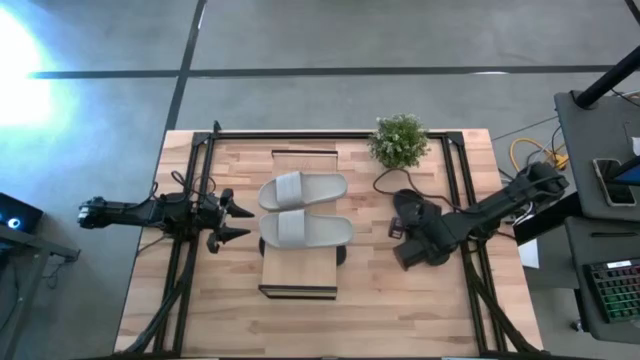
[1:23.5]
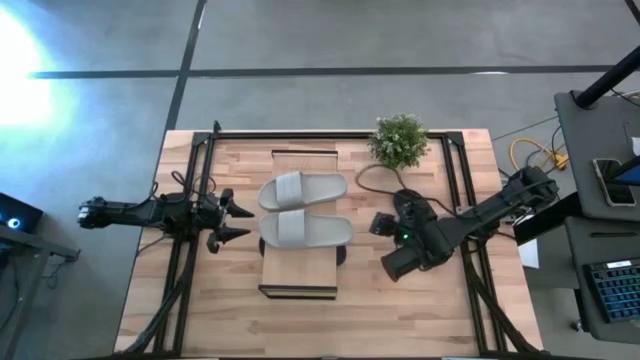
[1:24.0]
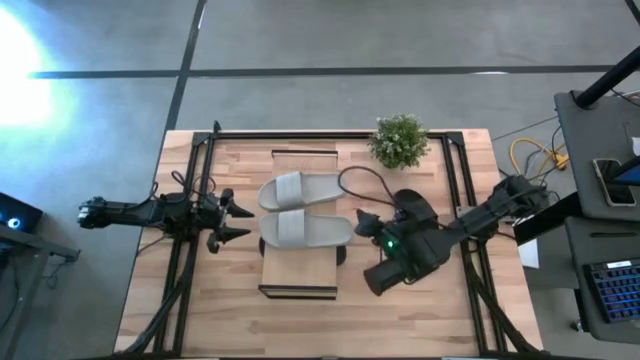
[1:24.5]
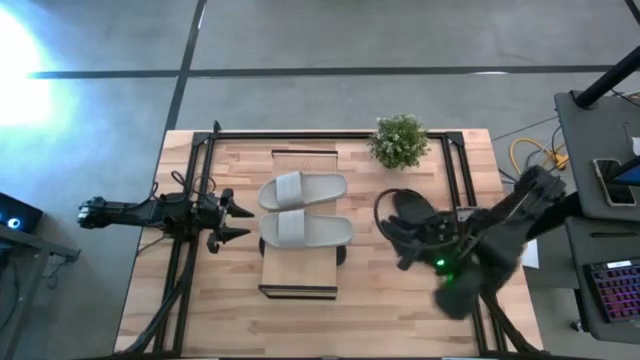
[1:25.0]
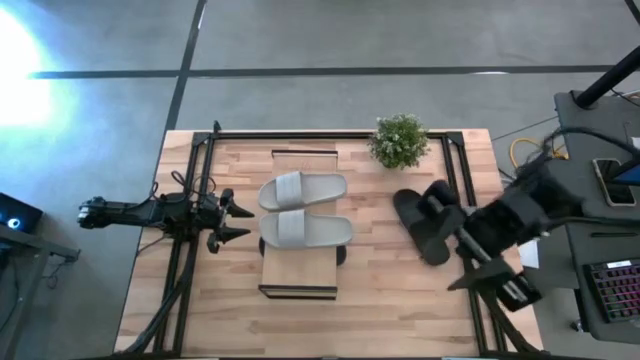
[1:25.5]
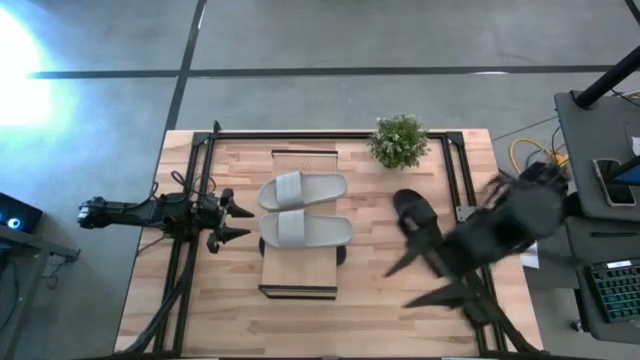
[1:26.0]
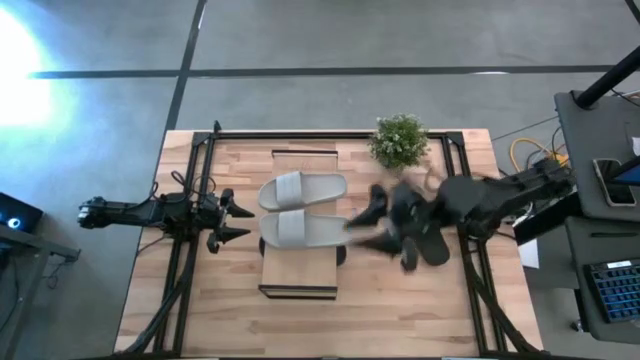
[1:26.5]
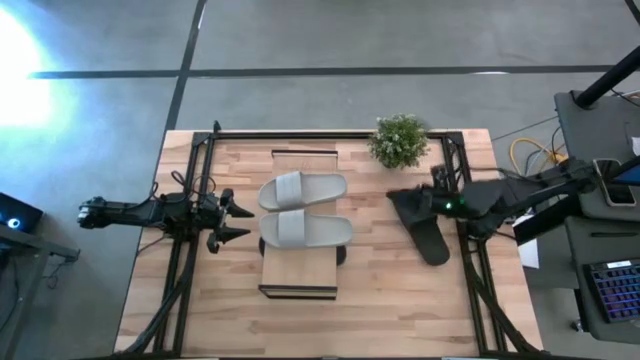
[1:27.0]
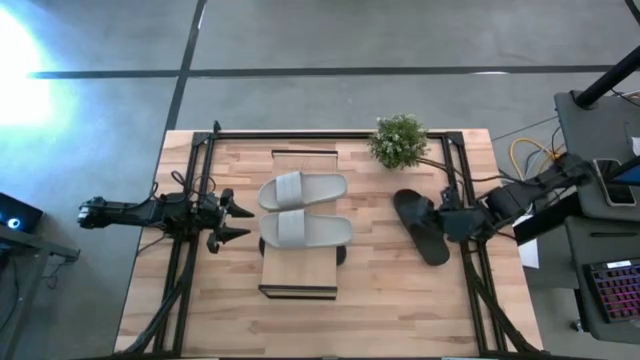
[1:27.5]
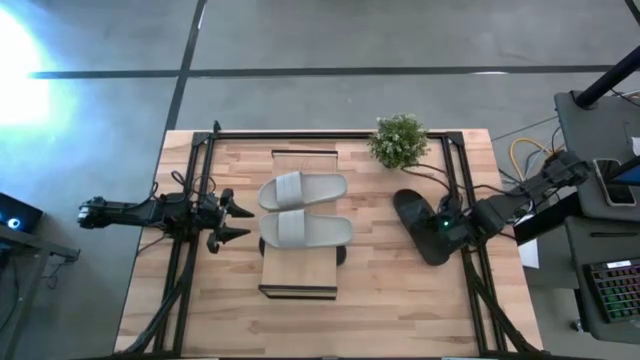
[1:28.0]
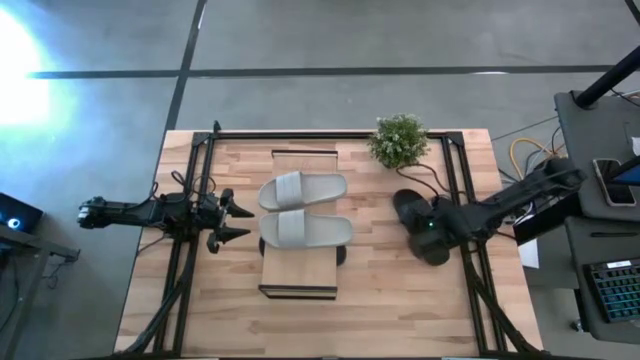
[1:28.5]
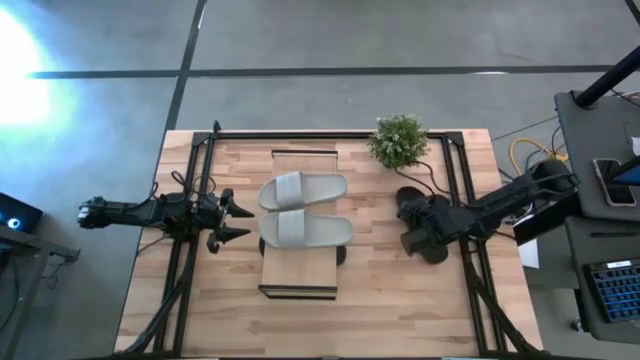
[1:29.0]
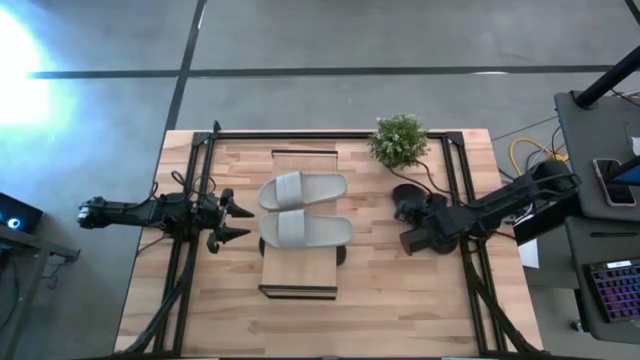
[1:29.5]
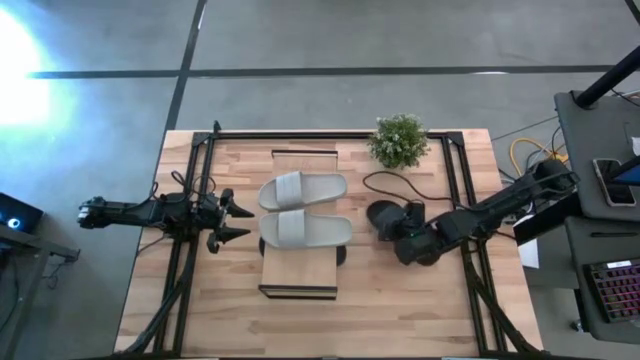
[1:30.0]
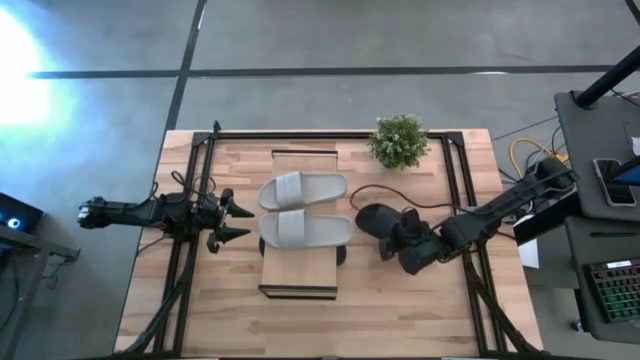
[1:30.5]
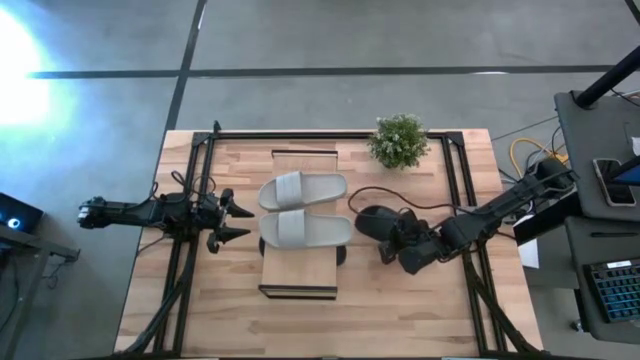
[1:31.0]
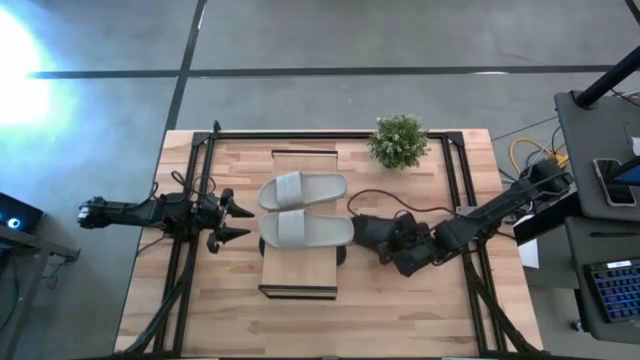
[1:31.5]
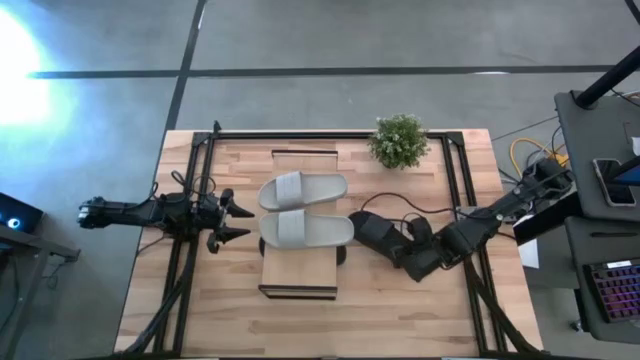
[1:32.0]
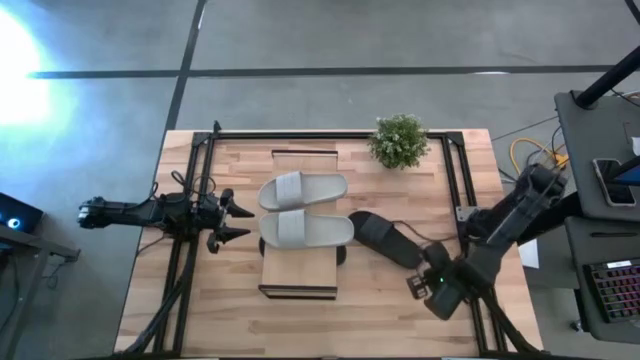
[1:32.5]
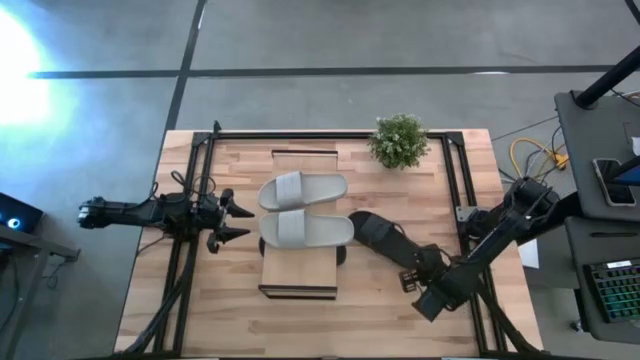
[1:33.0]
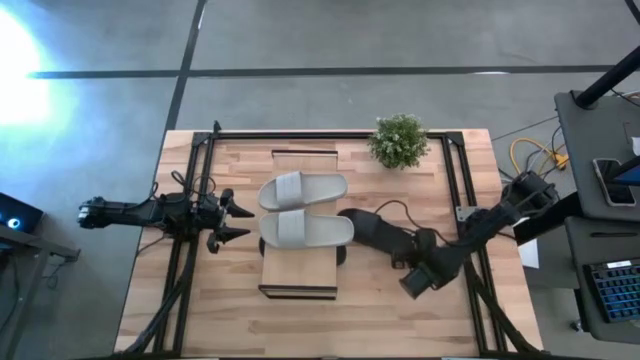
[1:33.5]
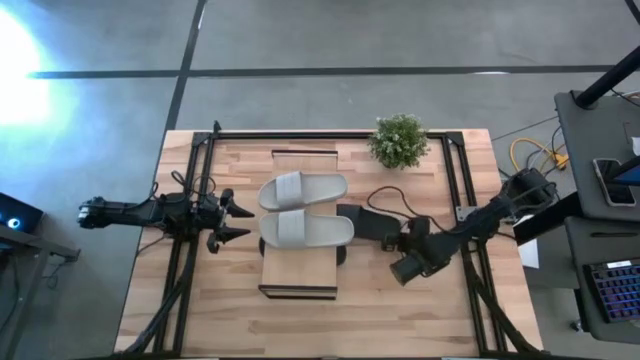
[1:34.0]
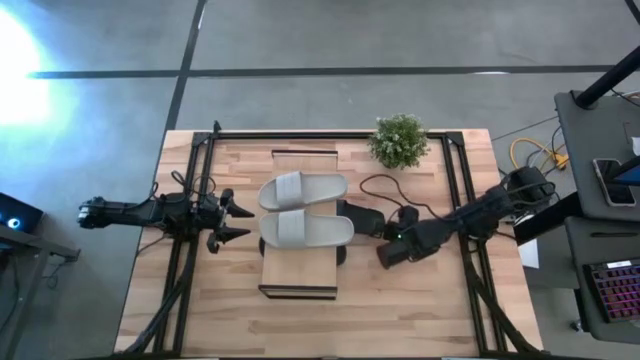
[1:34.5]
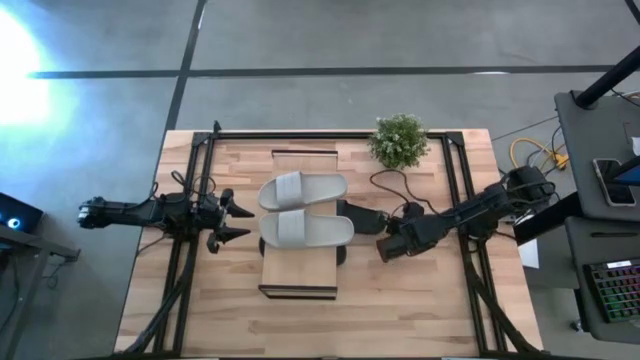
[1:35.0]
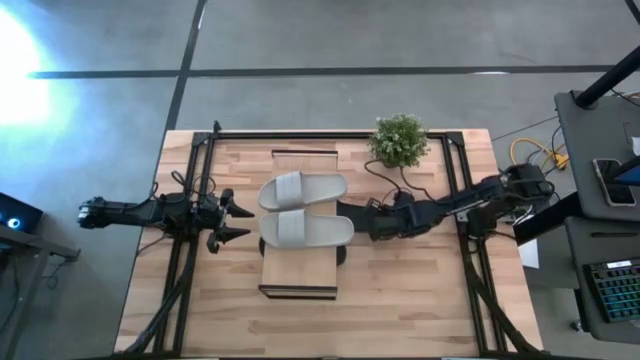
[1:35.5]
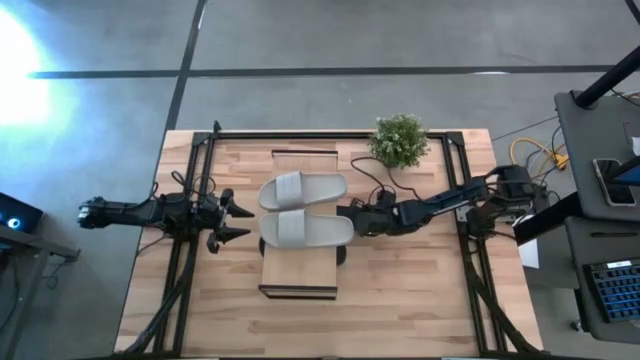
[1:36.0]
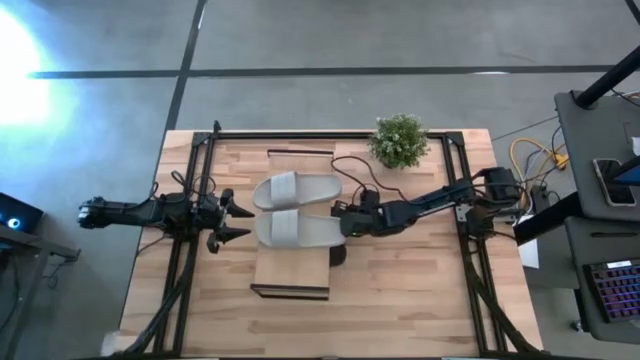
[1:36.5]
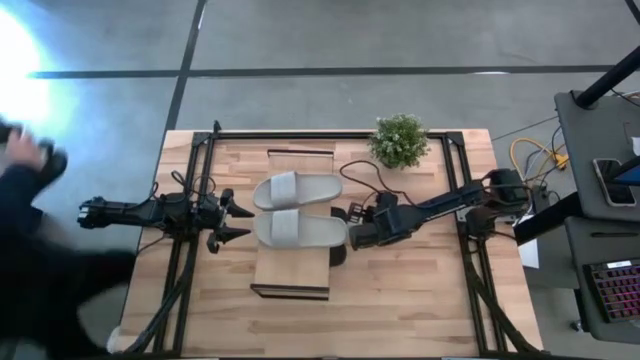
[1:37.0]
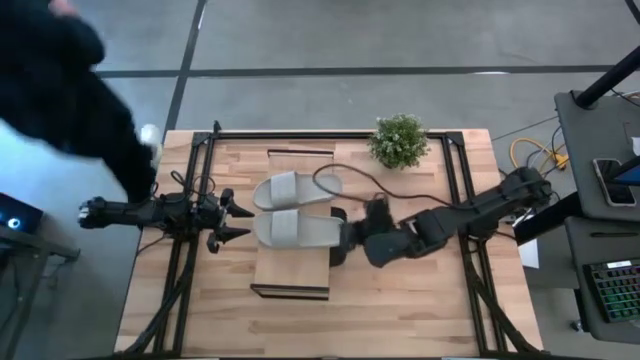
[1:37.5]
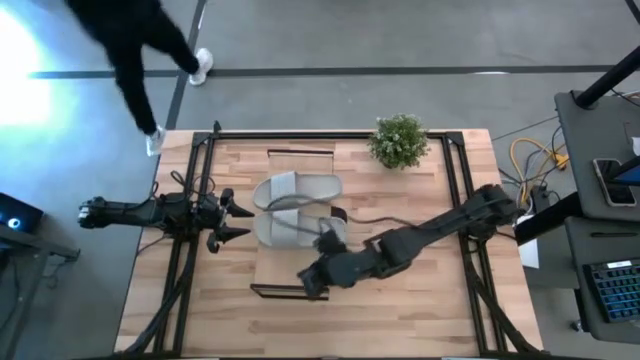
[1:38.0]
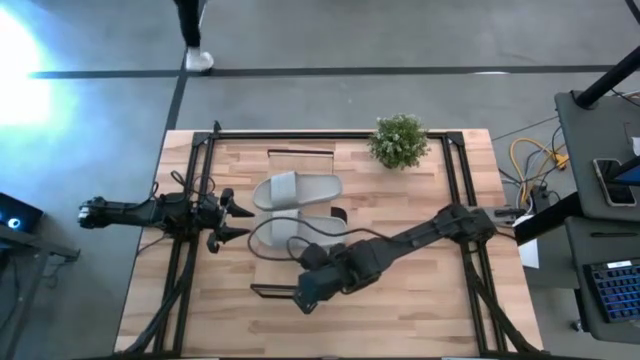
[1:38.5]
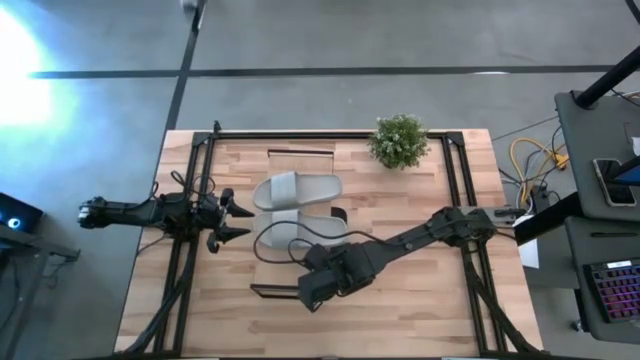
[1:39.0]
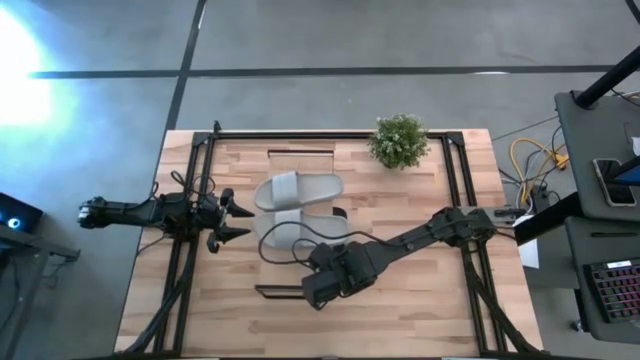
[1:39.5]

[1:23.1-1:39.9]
Task: Pick and place slides into the shelf
Move the black slide under the shelf

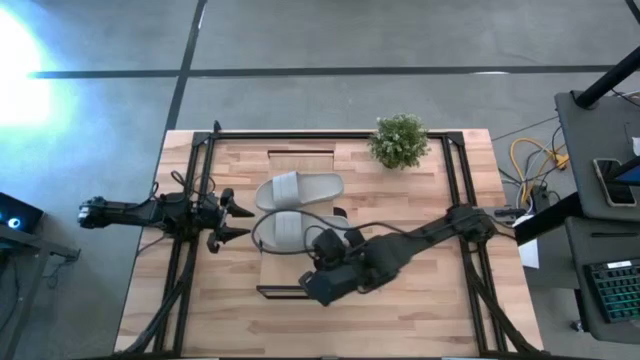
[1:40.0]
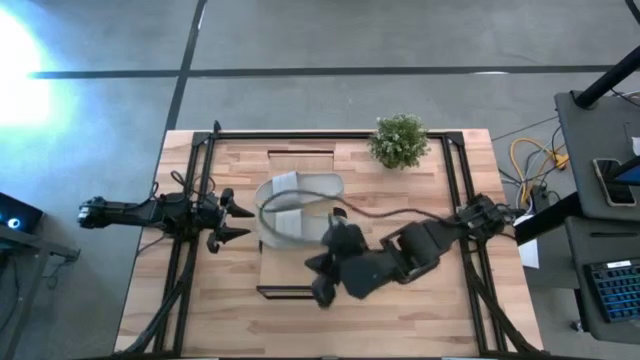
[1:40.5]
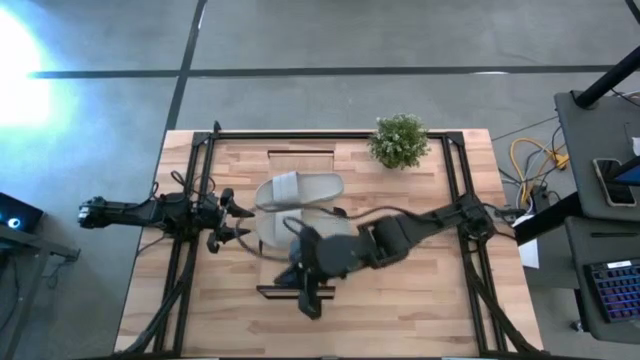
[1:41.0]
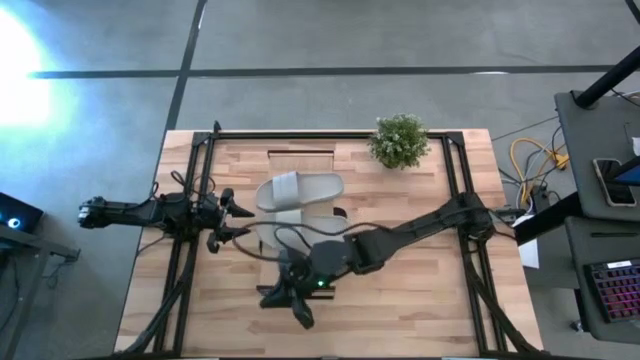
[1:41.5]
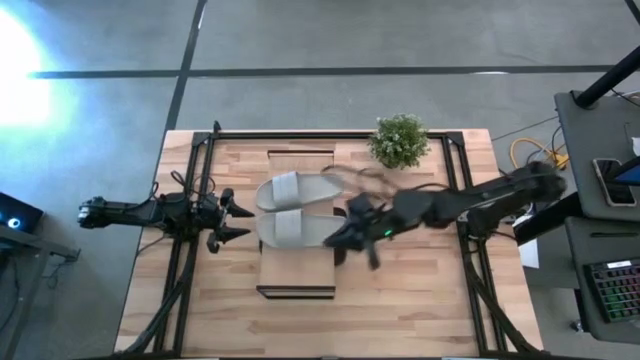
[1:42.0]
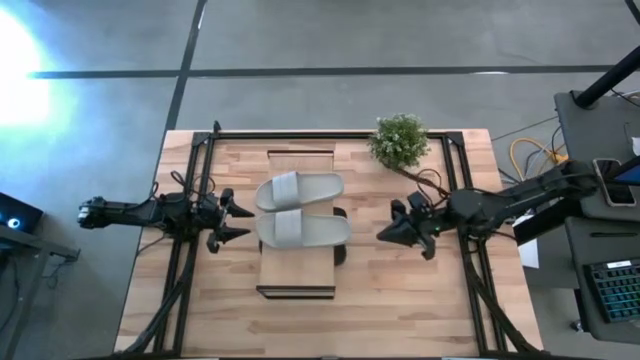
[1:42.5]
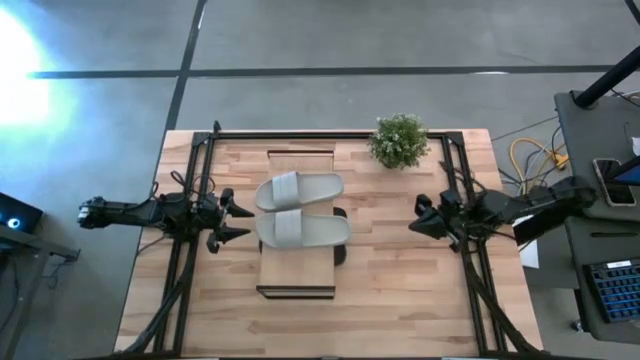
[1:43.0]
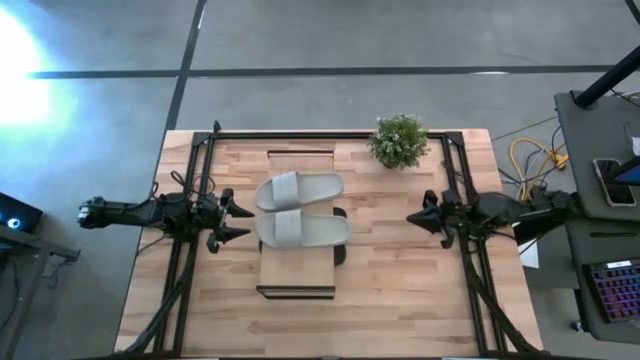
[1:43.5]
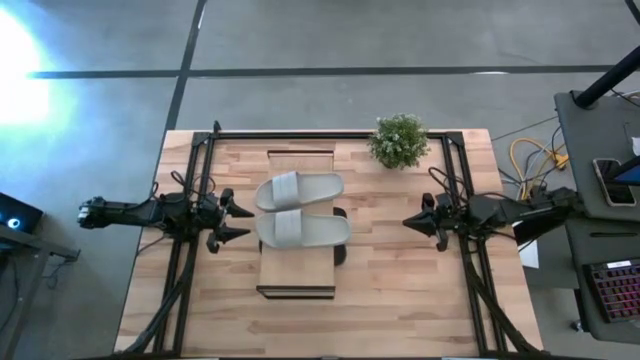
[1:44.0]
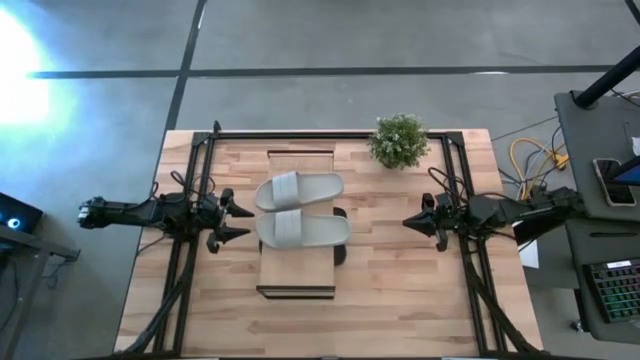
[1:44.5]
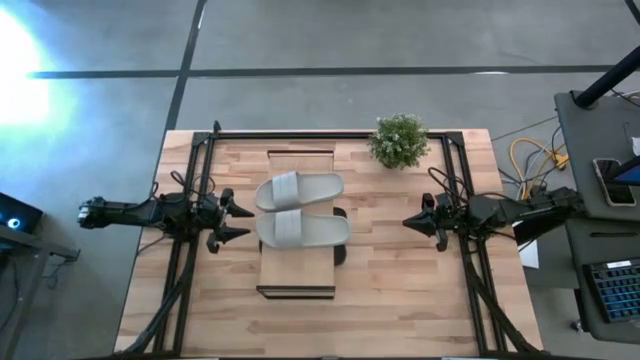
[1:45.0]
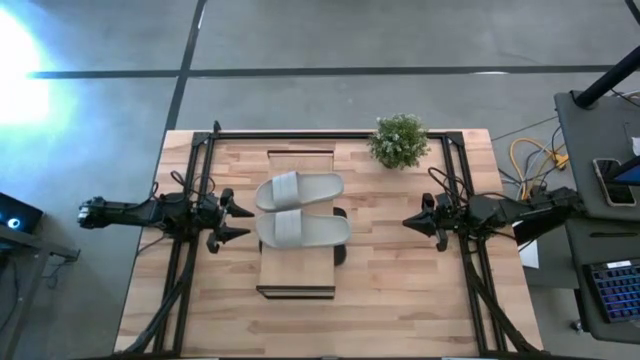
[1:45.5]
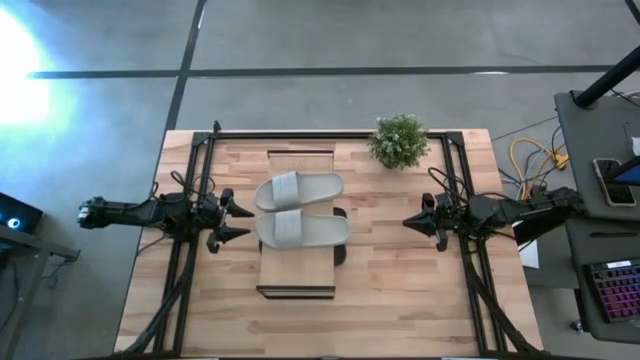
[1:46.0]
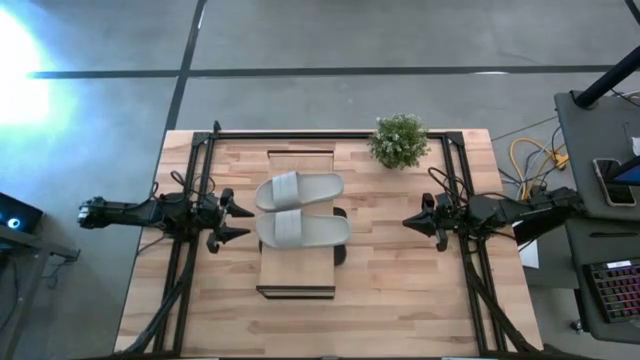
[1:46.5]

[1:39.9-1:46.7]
Return to Home Position
